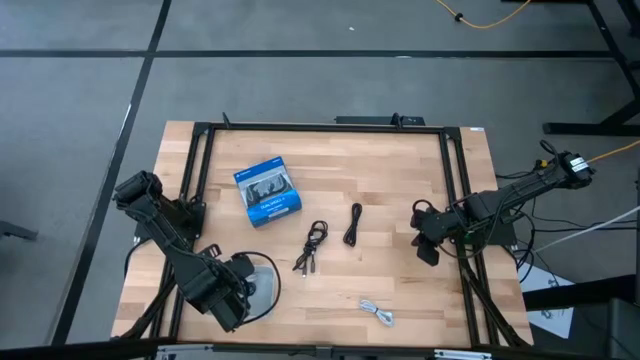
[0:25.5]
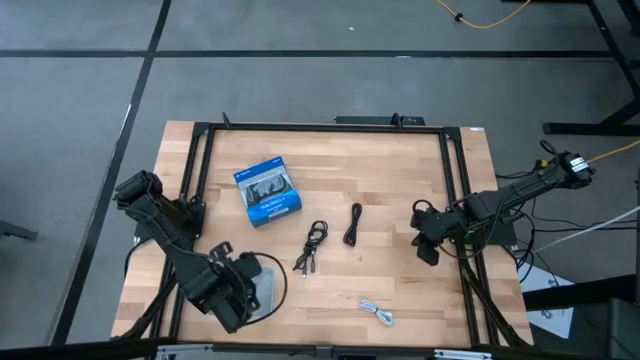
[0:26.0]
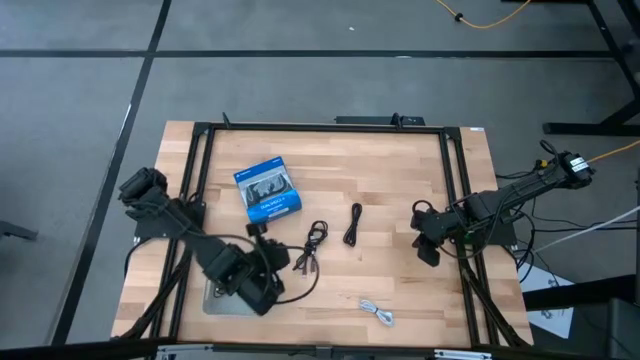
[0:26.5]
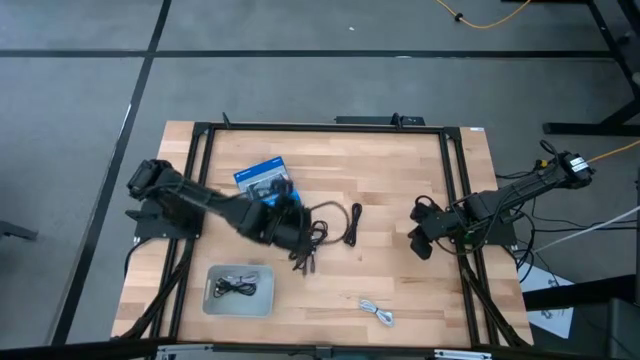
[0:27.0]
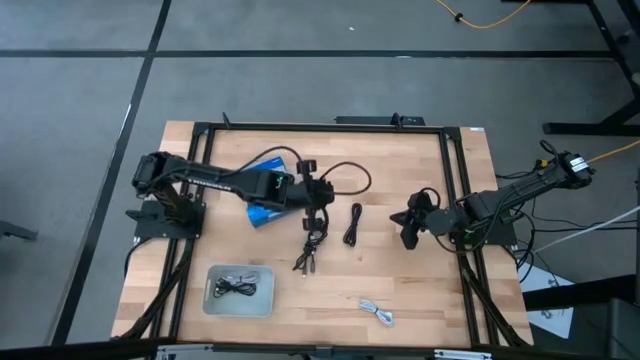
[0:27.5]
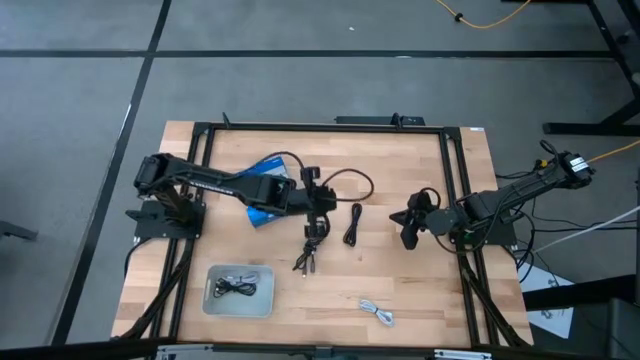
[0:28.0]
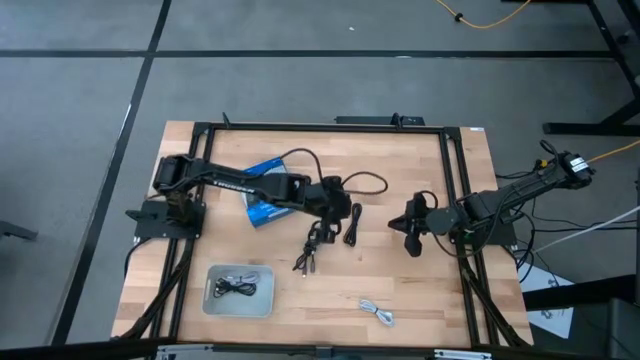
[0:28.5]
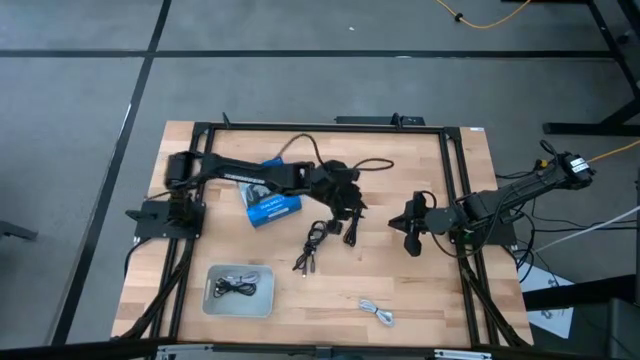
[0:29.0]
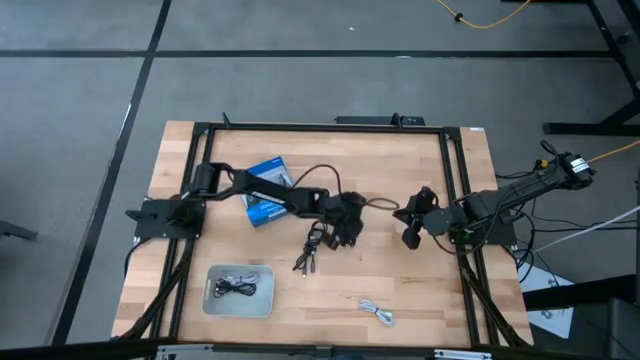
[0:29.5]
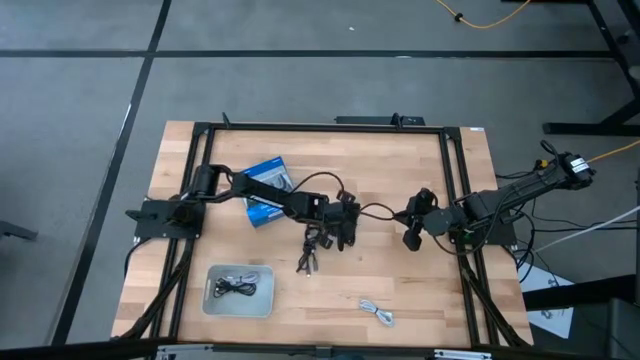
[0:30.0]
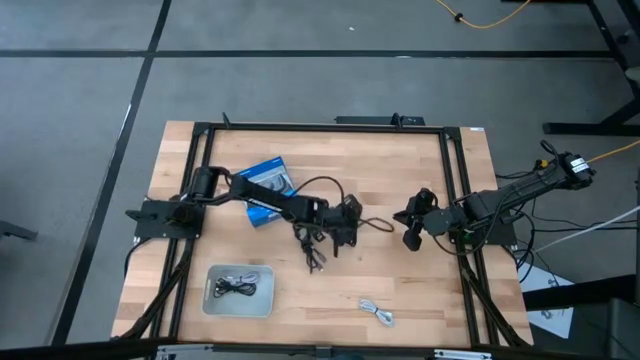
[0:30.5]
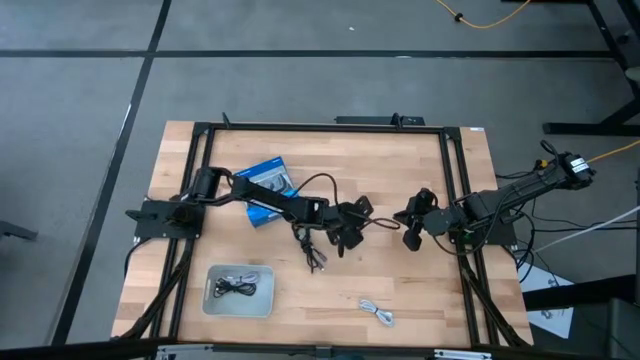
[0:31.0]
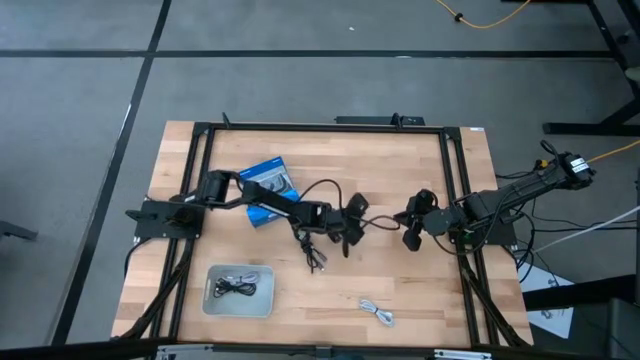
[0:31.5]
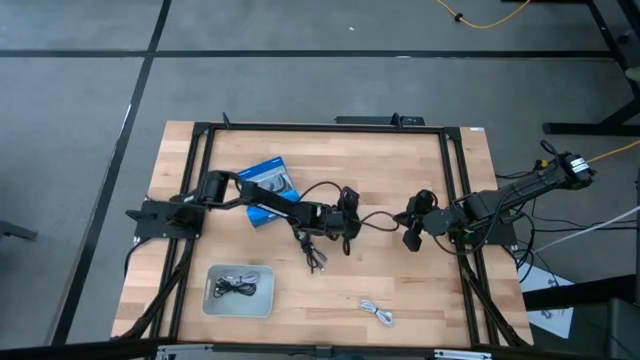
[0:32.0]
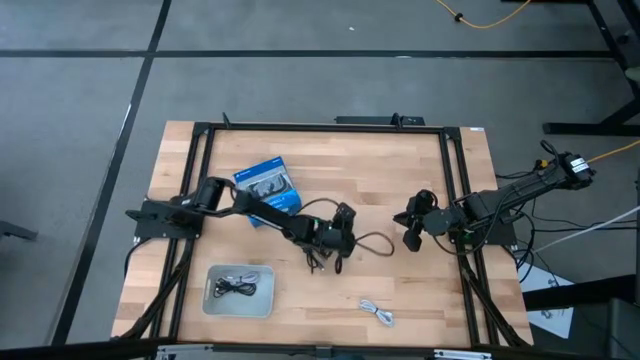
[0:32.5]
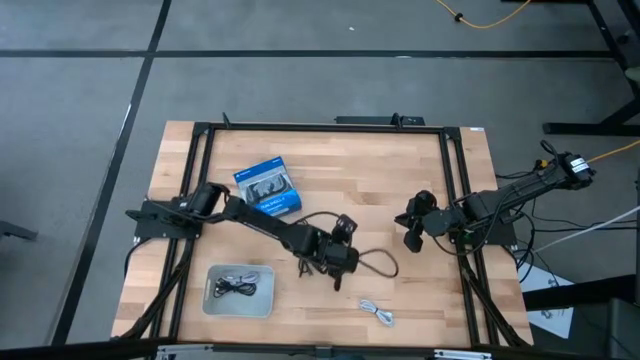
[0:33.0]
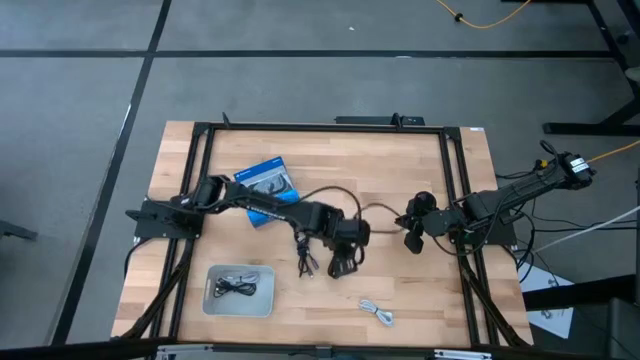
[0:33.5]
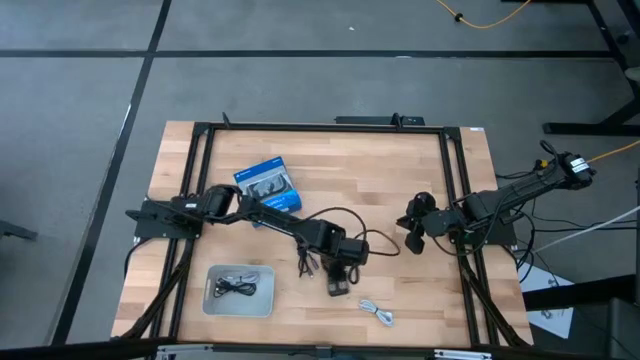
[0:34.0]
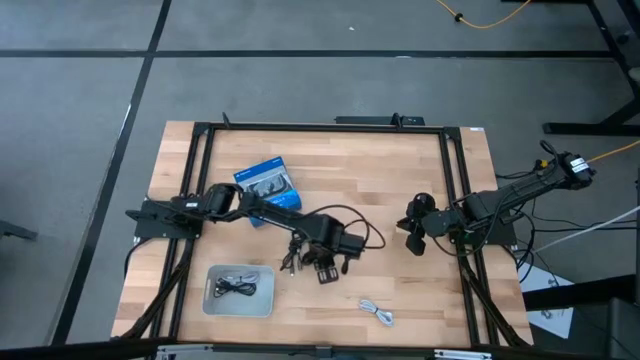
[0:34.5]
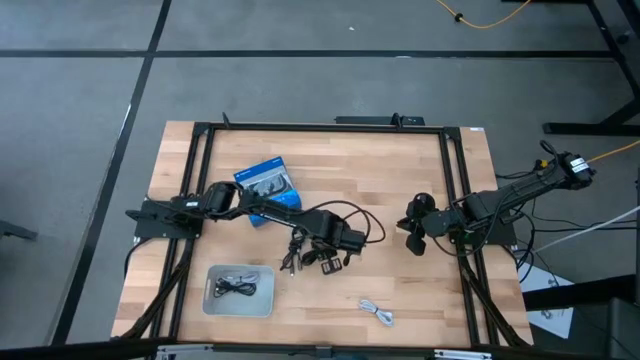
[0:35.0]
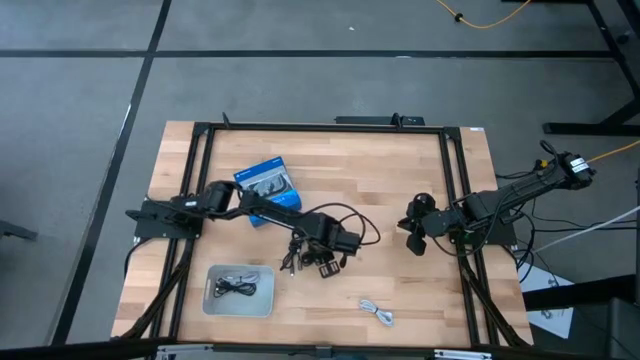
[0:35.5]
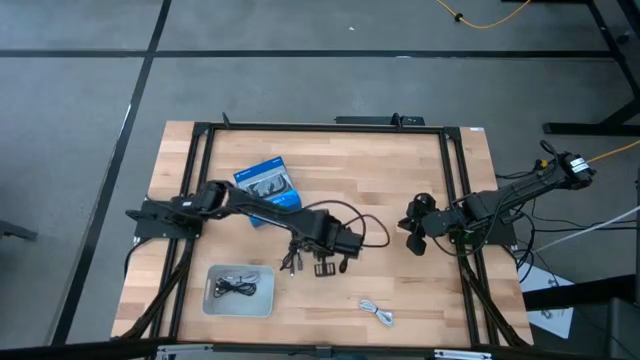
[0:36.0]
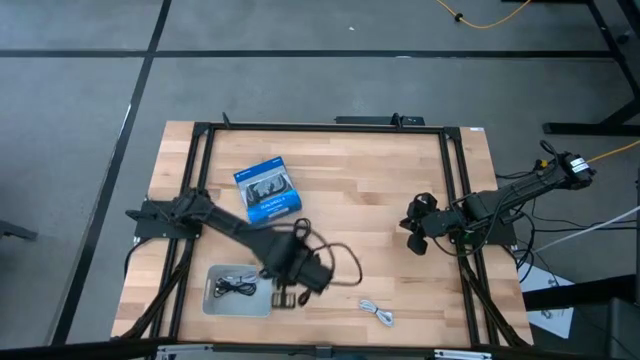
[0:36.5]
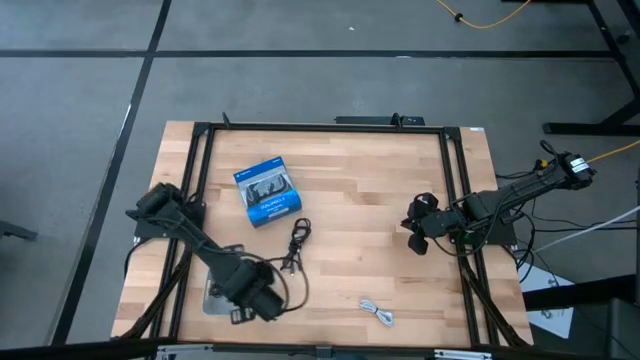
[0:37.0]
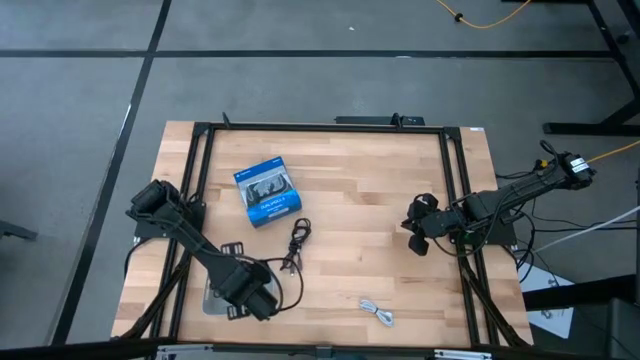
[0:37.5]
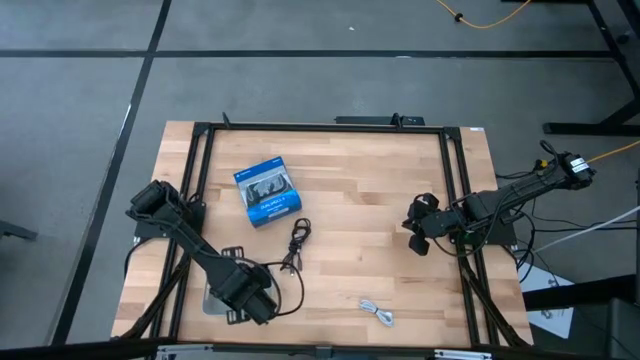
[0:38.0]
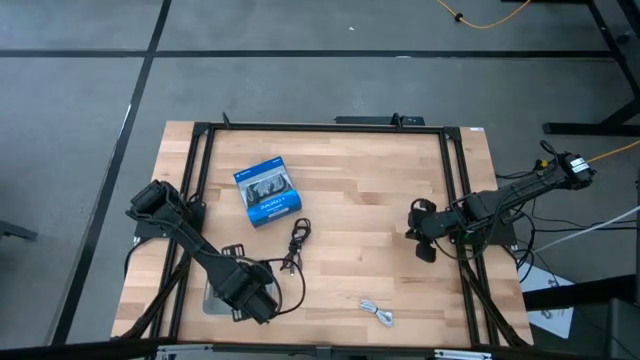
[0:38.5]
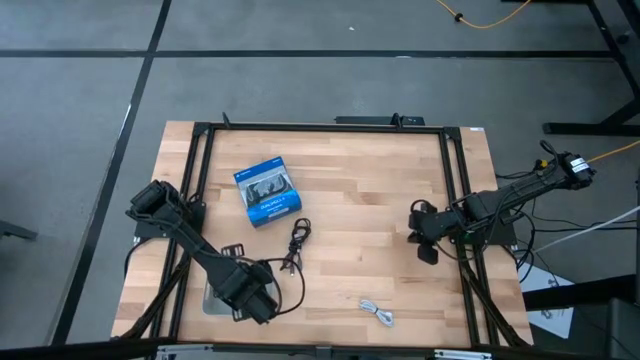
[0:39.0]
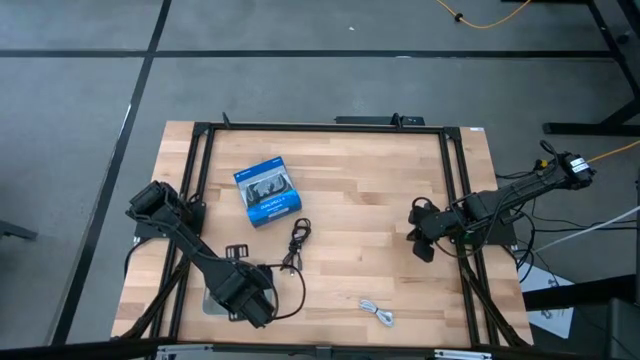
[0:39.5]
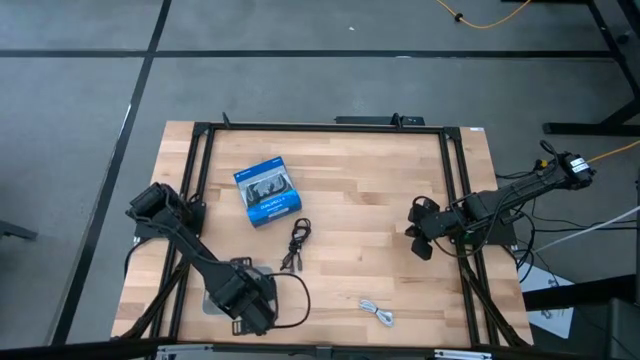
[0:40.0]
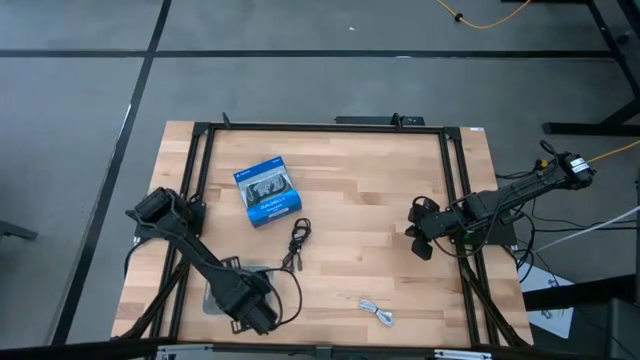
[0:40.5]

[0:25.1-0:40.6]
Task: Pick and place USB-C Cables
Put the right black usb cable into the white bin

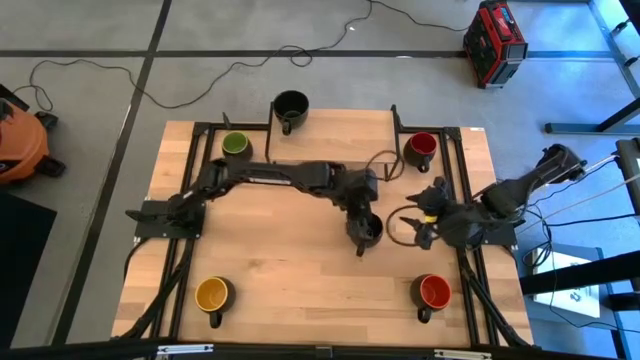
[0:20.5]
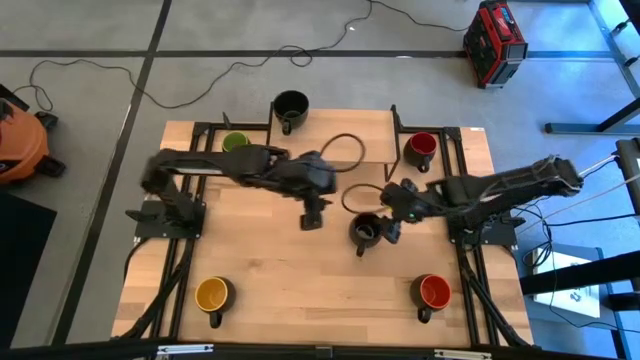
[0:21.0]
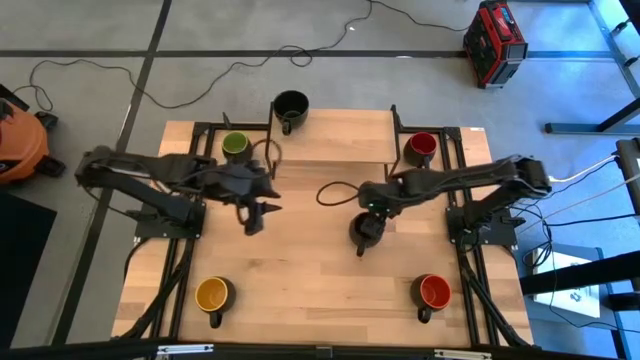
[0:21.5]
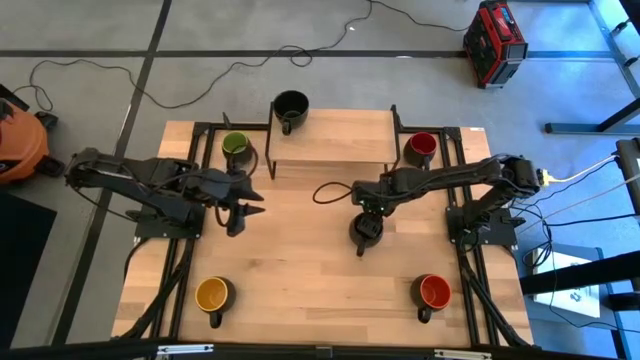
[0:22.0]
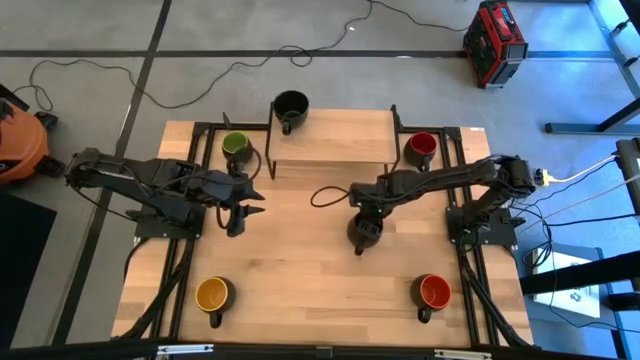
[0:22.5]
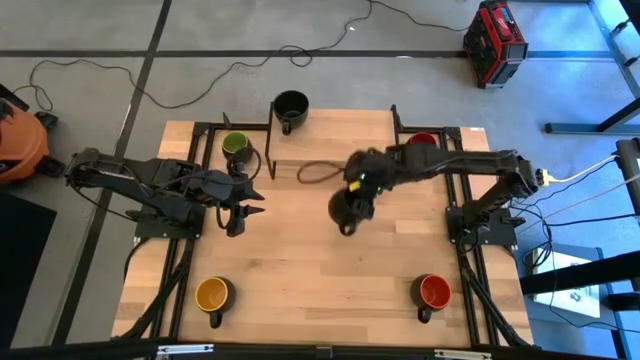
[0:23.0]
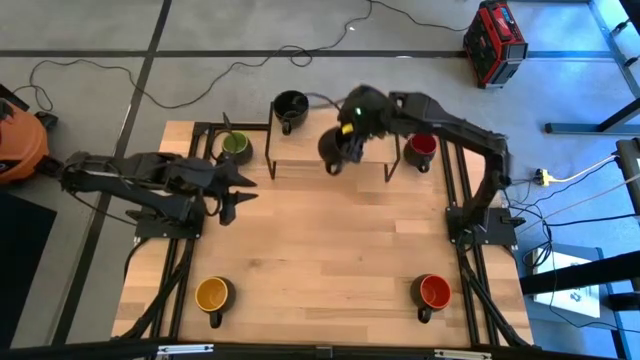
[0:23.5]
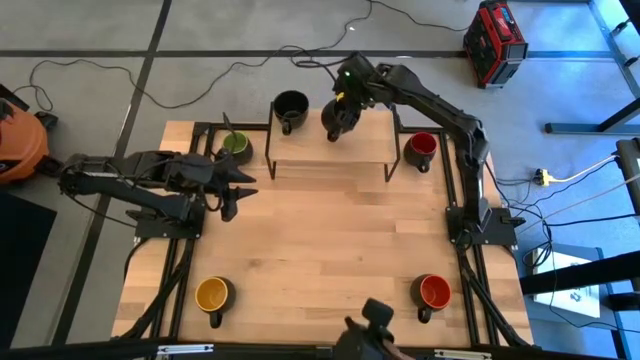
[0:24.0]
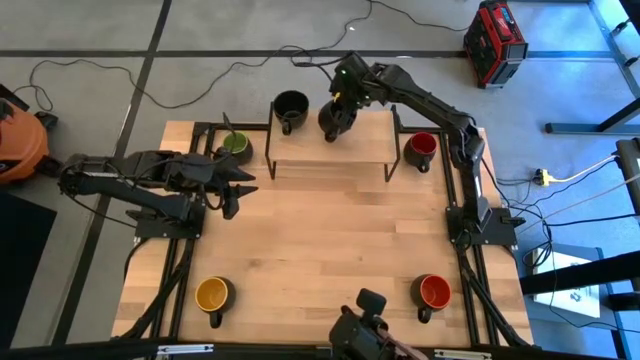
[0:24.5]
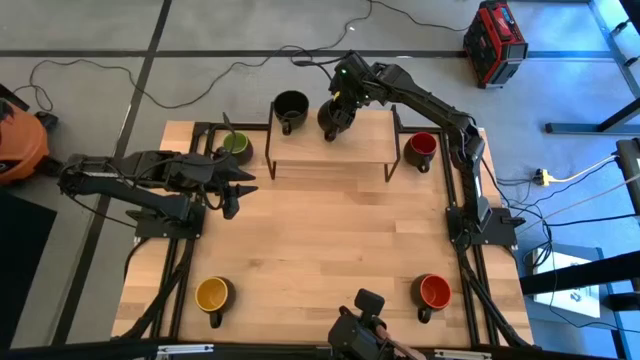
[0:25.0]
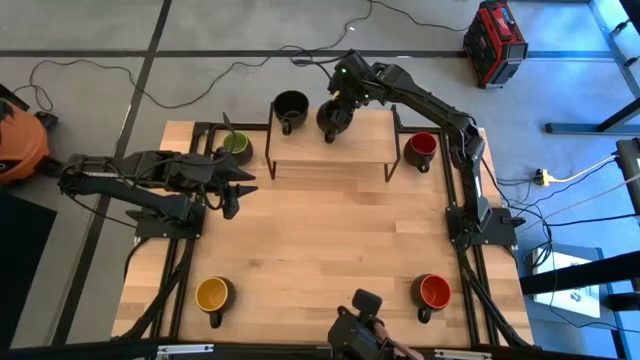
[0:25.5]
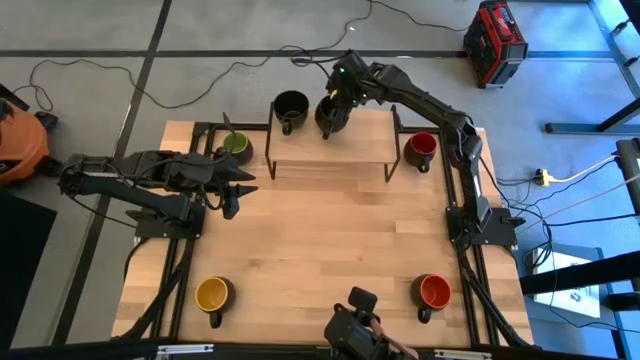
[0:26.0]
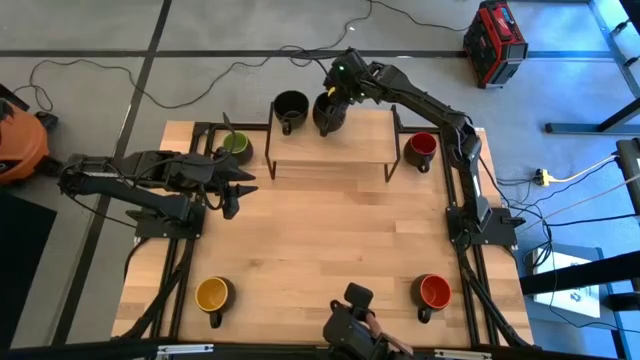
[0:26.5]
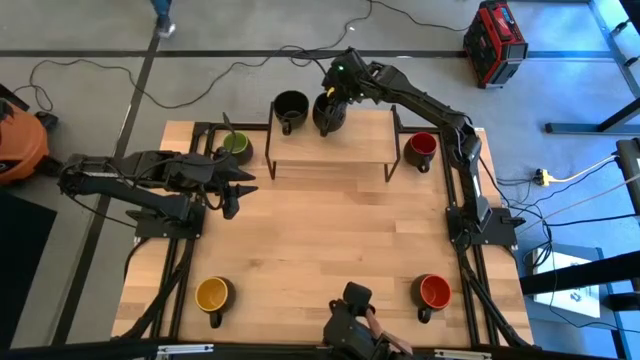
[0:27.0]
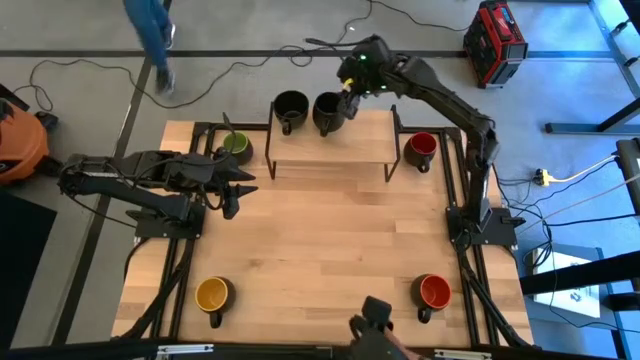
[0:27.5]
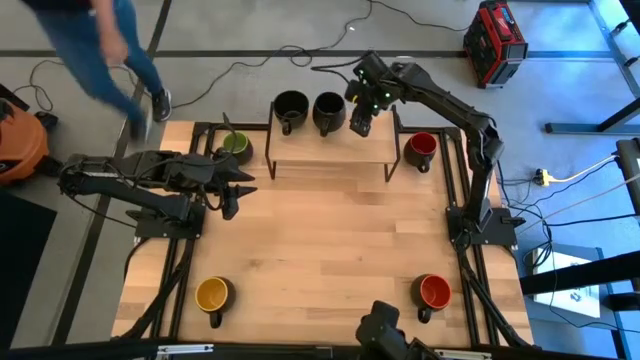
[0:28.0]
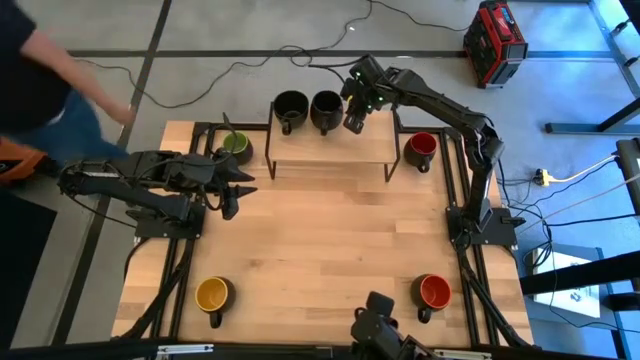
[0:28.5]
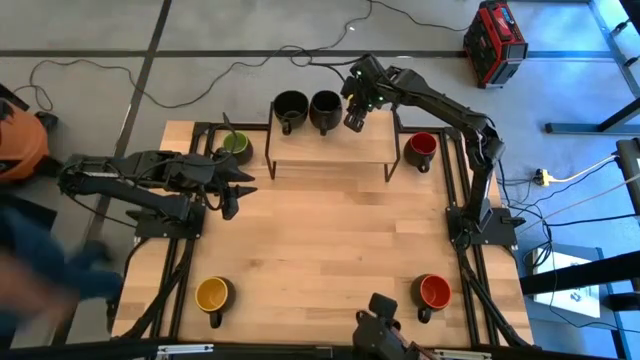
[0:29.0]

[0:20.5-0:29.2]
Task: Place coffee mugs
Put the black mug on the shelf
